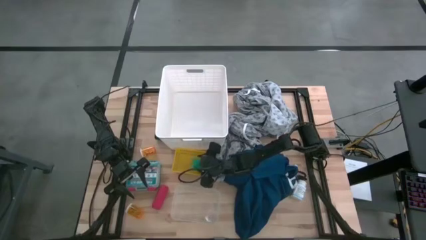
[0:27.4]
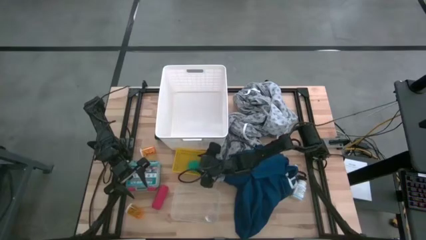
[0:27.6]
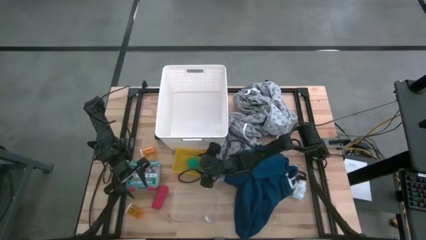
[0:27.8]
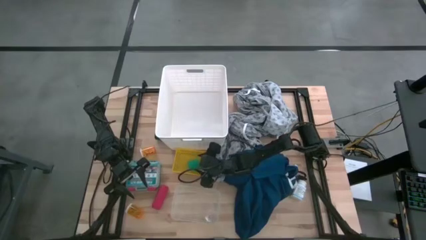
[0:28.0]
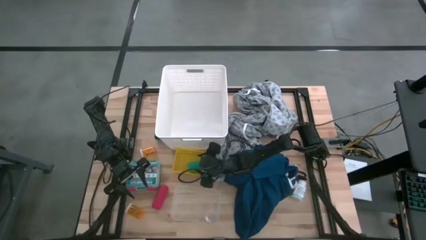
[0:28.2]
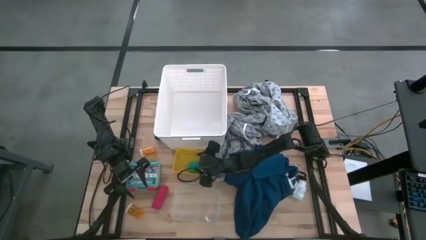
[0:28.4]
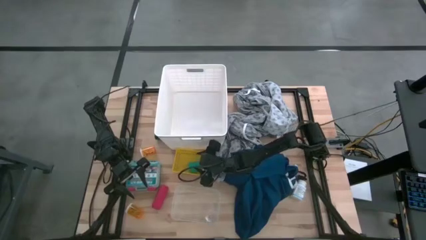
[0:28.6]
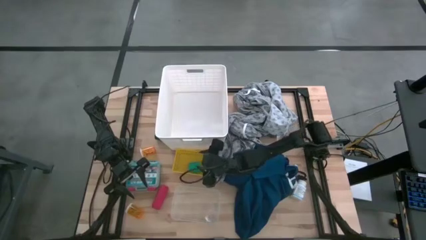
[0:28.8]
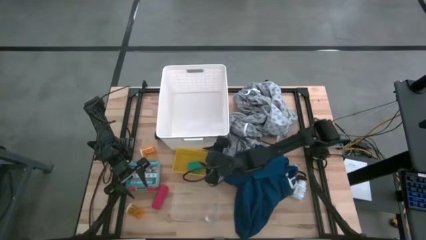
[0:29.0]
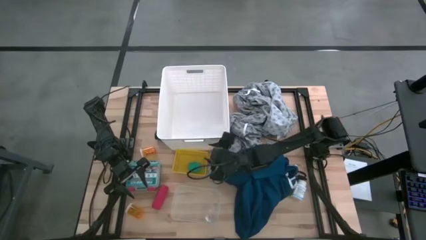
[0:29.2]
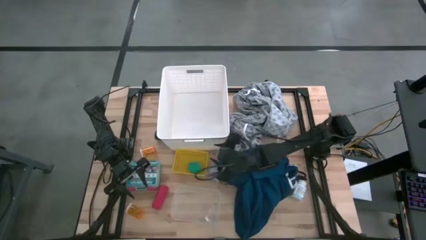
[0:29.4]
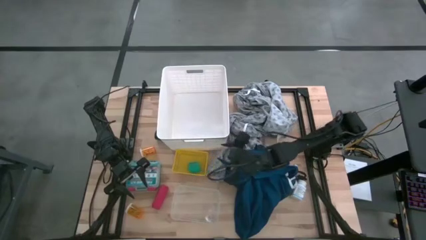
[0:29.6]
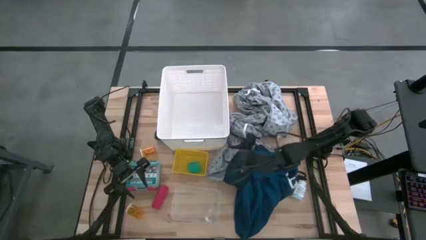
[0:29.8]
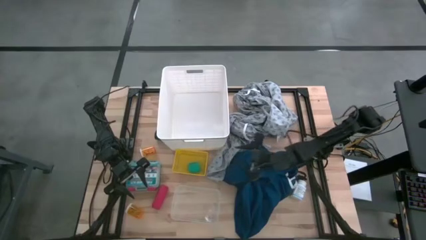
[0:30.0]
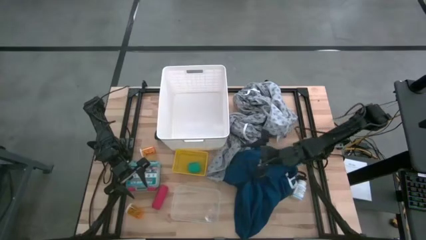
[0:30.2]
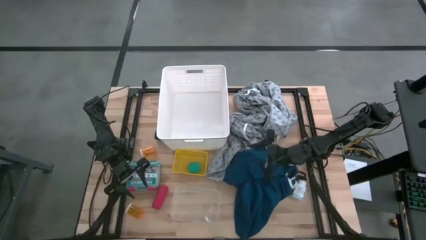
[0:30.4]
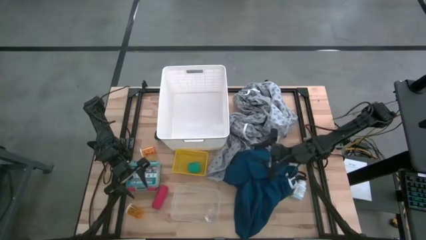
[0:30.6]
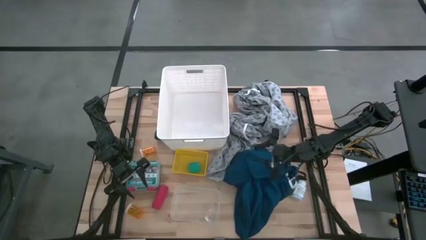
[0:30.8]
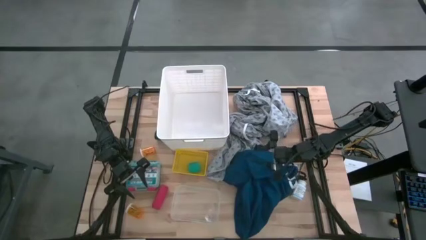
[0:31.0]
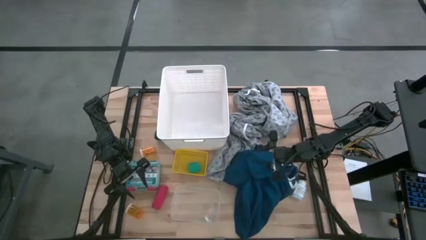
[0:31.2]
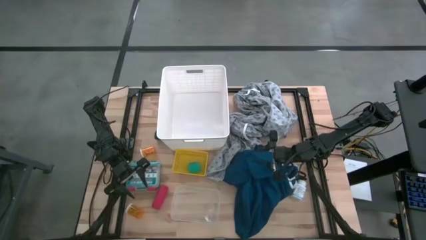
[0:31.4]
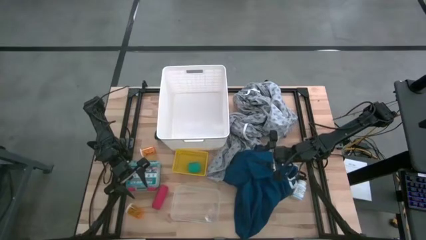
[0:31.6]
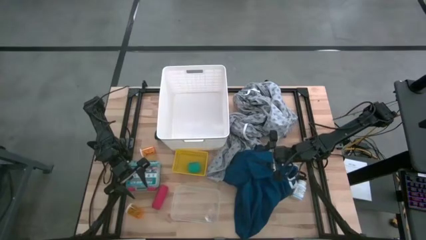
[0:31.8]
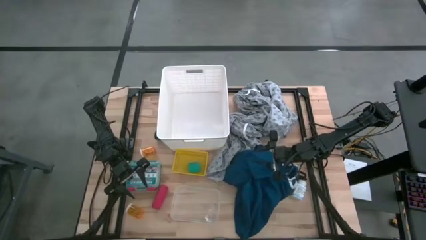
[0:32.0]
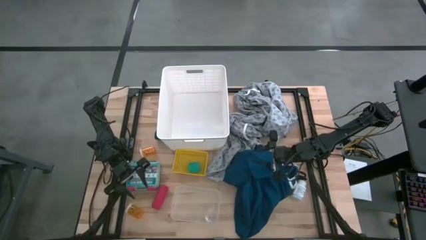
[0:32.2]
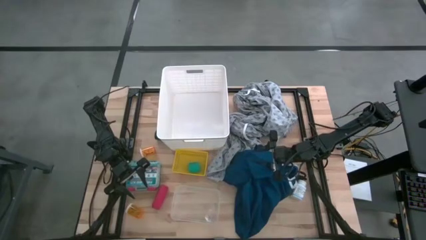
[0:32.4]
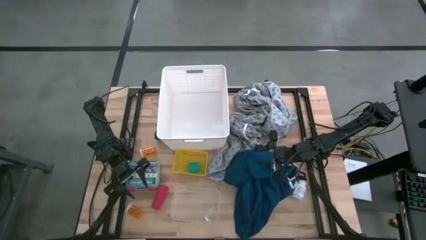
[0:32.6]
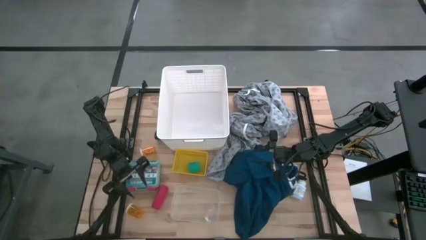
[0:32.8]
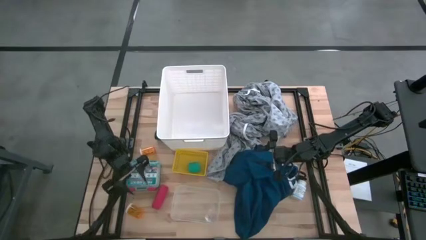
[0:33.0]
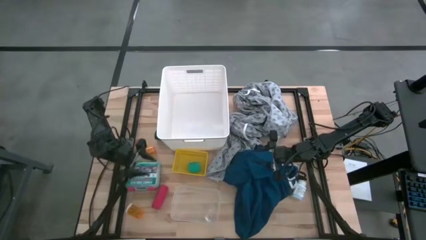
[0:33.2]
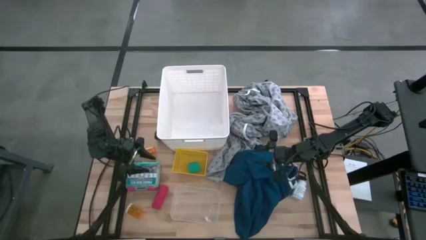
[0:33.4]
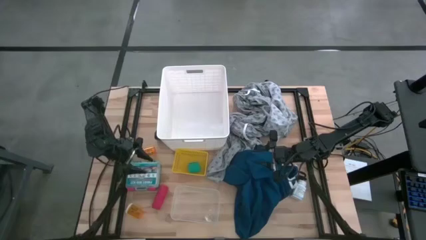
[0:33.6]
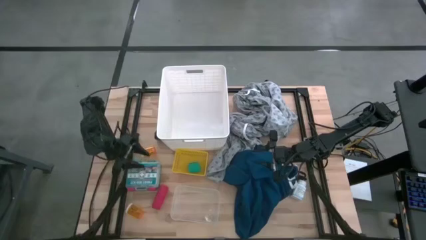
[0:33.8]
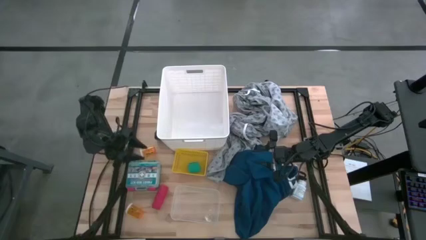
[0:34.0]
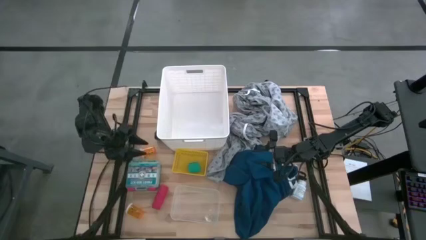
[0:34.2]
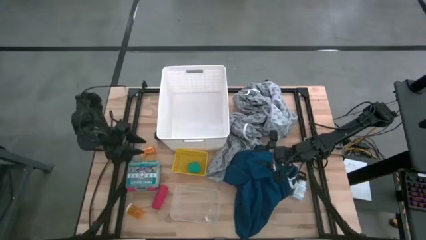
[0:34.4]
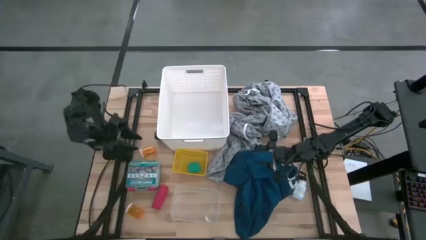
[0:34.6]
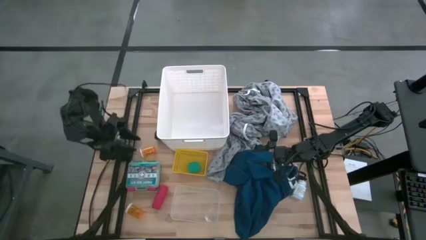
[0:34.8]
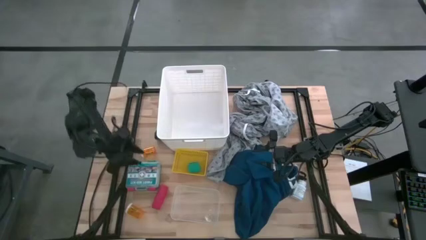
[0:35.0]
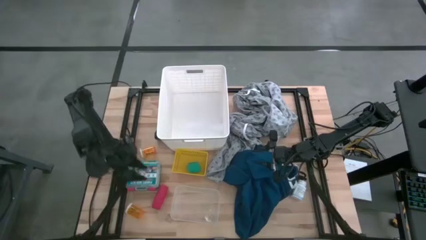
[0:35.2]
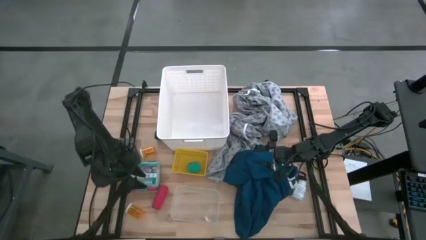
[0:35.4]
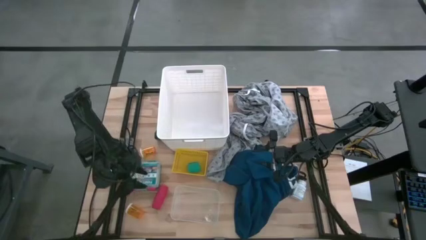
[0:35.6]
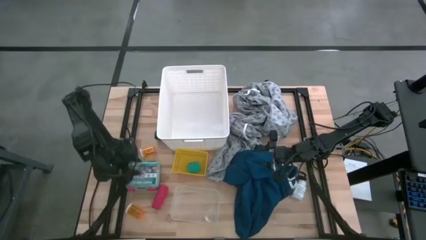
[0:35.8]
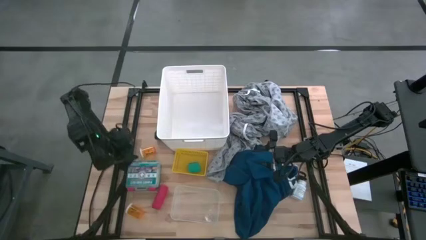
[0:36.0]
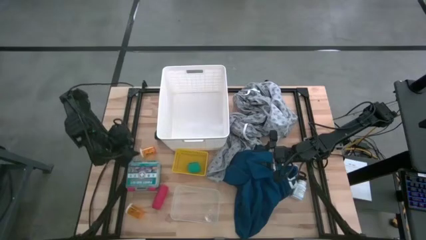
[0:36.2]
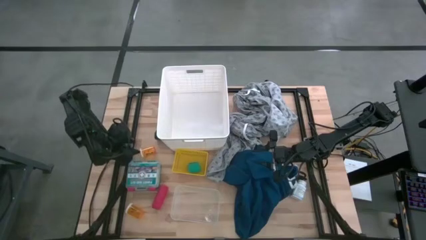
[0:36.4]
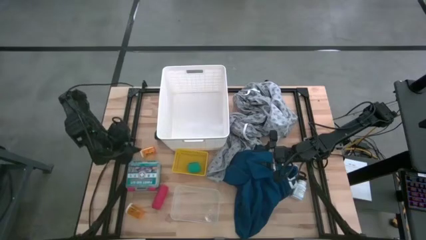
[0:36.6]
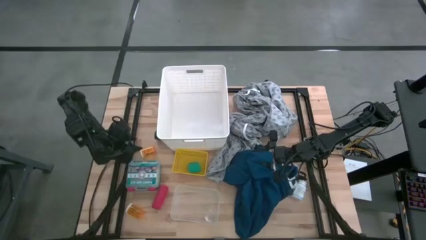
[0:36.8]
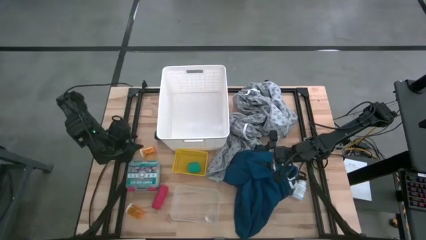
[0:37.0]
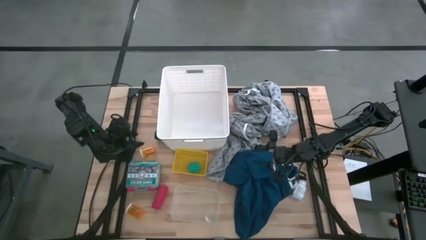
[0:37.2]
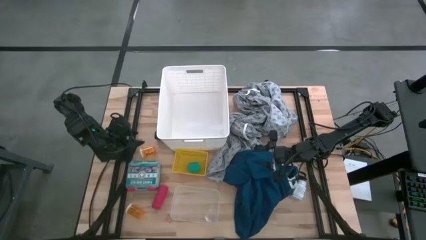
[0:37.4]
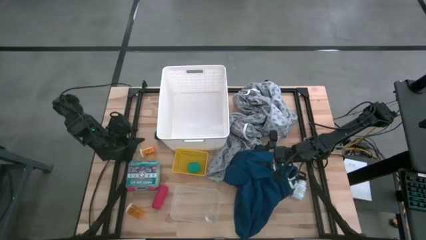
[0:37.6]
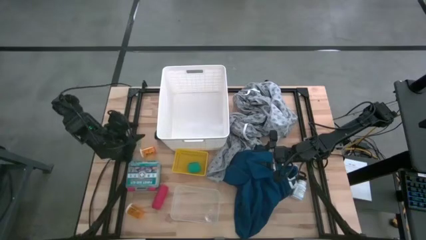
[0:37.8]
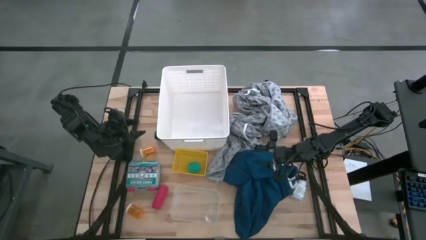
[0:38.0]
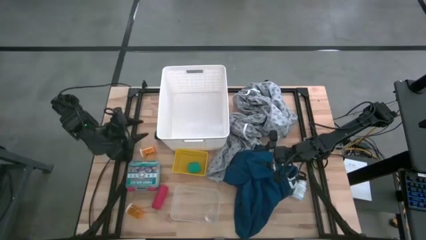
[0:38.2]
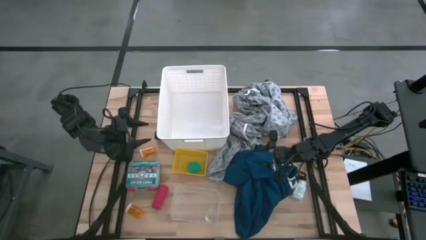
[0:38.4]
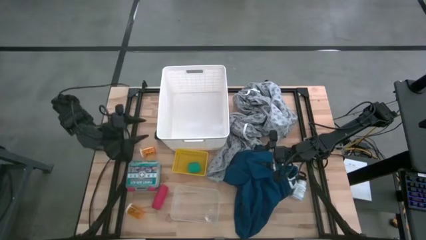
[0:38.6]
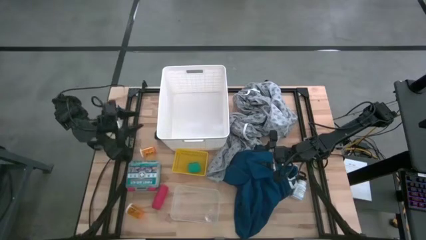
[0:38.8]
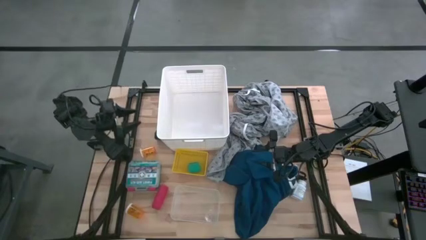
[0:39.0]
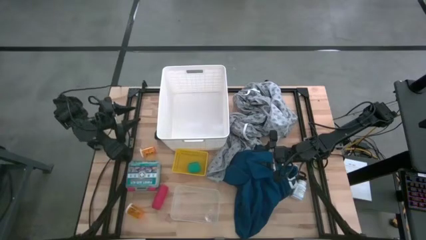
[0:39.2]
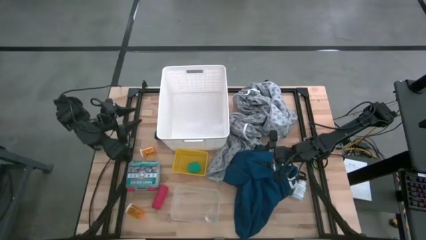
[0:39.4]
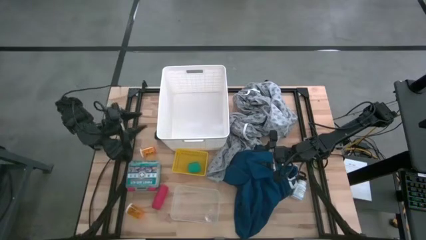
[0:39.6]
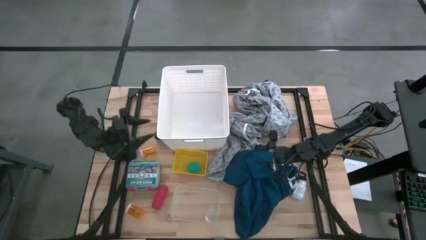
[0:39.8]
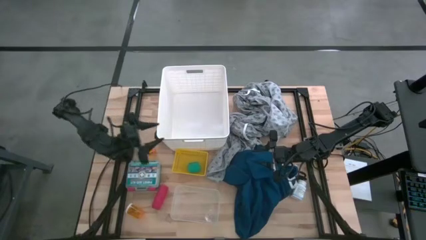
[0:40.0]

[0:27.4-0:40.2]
Task: Pick & Place Medicine items
Put the black bandage into the yellow bin
